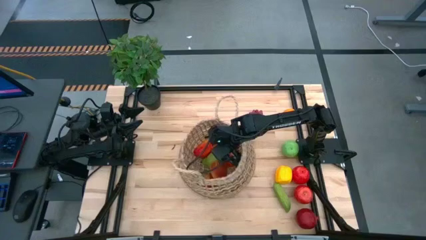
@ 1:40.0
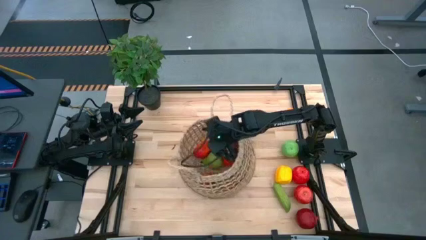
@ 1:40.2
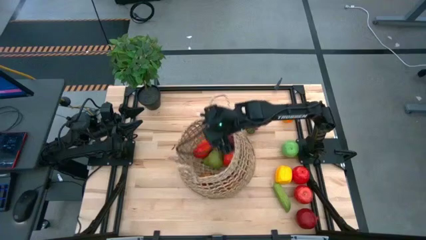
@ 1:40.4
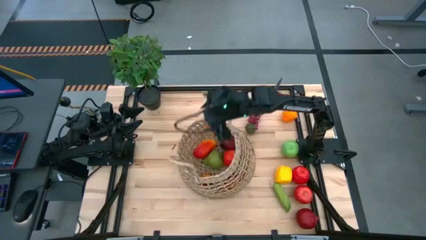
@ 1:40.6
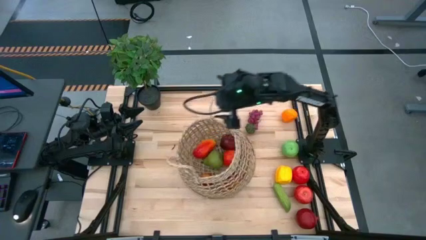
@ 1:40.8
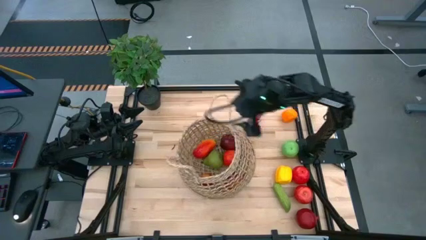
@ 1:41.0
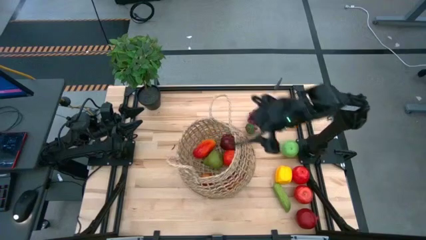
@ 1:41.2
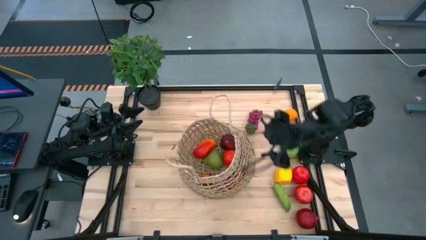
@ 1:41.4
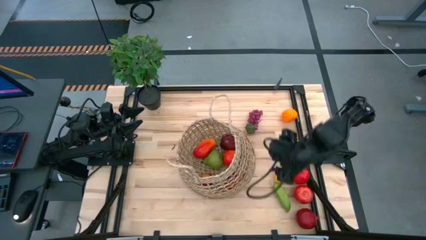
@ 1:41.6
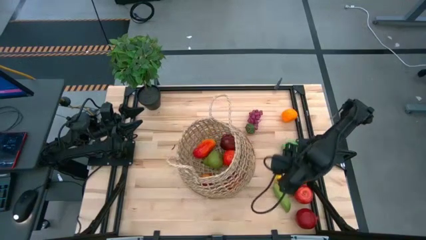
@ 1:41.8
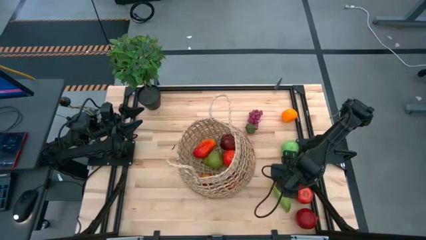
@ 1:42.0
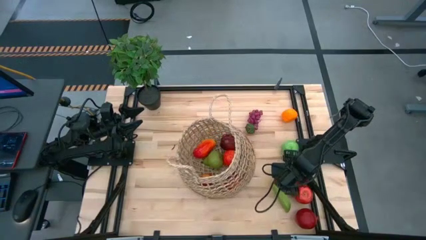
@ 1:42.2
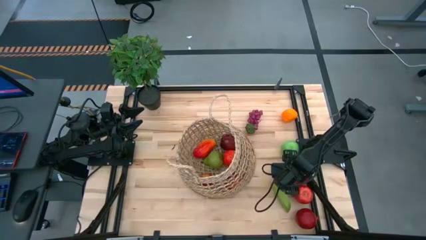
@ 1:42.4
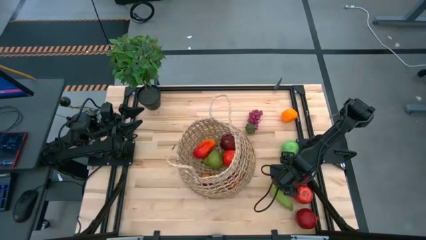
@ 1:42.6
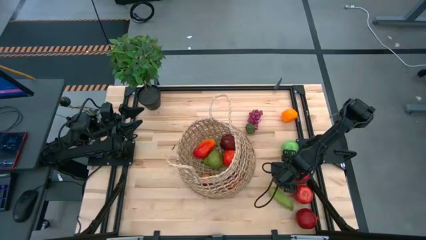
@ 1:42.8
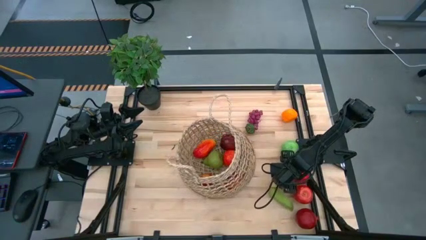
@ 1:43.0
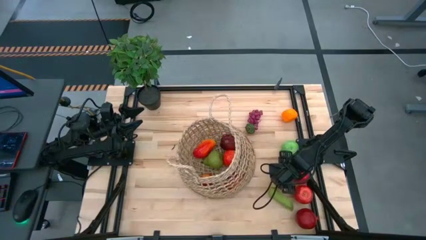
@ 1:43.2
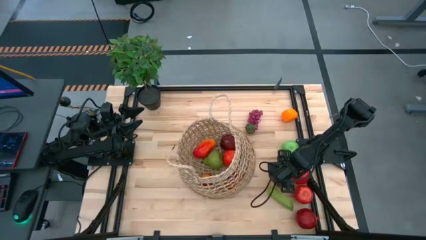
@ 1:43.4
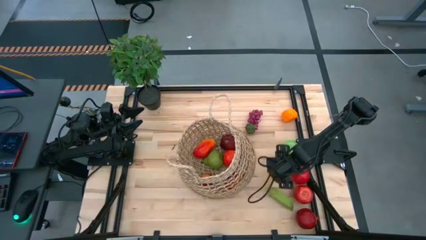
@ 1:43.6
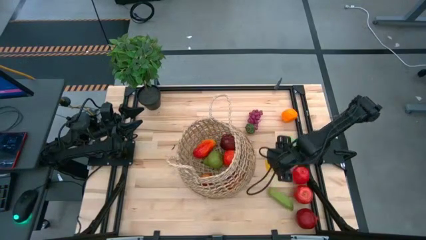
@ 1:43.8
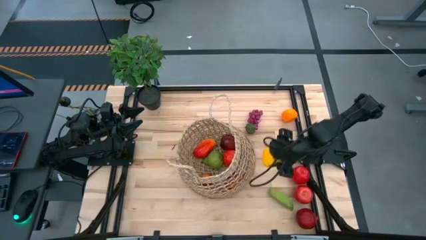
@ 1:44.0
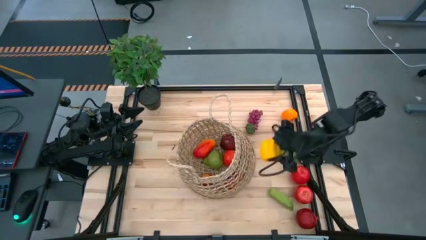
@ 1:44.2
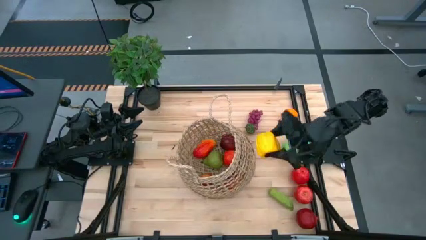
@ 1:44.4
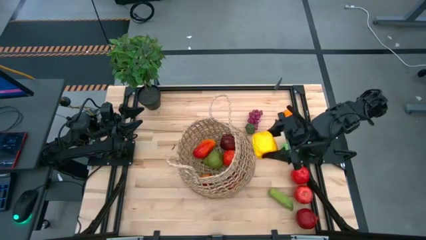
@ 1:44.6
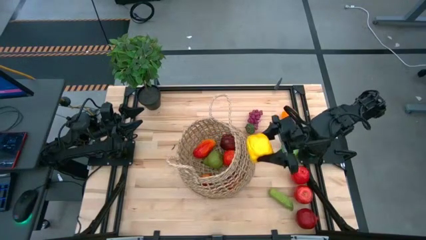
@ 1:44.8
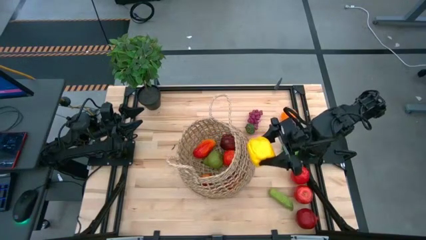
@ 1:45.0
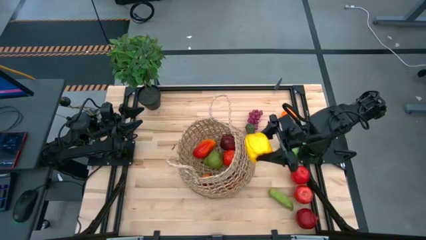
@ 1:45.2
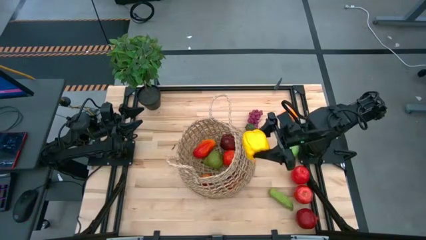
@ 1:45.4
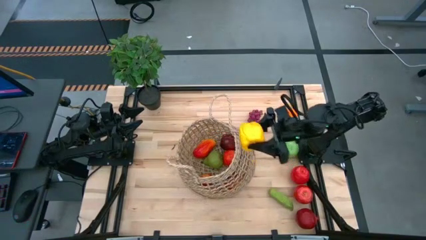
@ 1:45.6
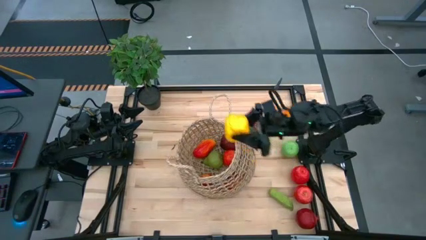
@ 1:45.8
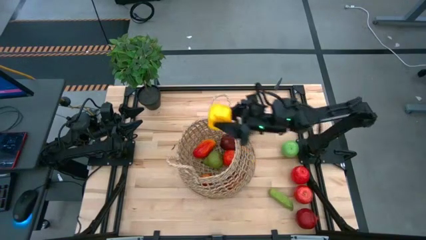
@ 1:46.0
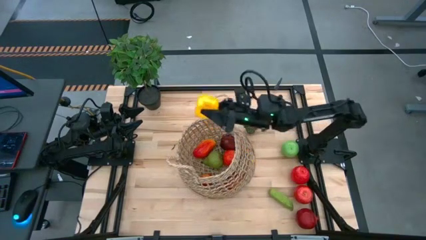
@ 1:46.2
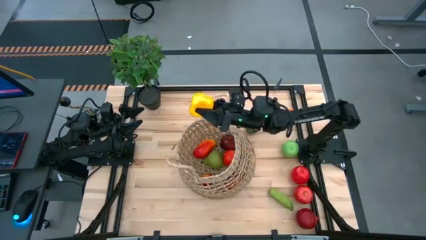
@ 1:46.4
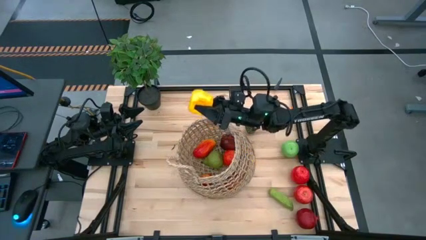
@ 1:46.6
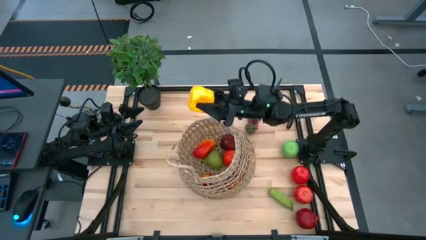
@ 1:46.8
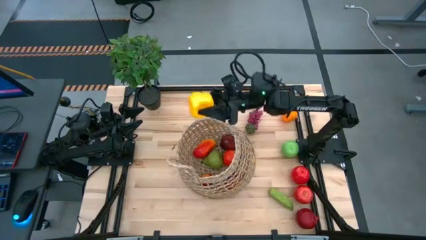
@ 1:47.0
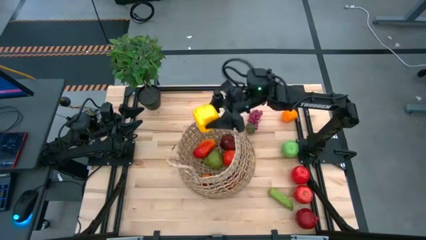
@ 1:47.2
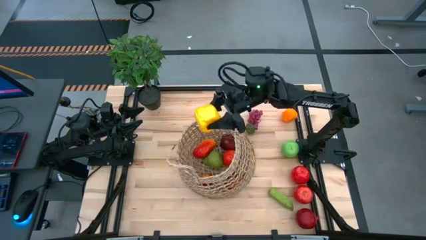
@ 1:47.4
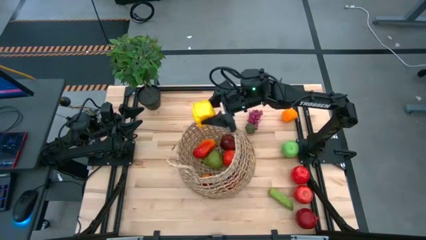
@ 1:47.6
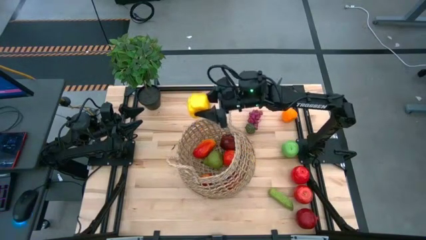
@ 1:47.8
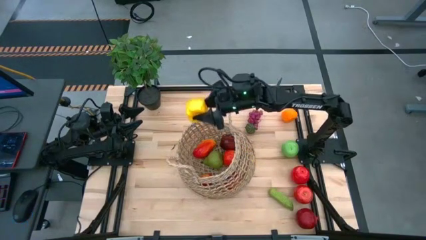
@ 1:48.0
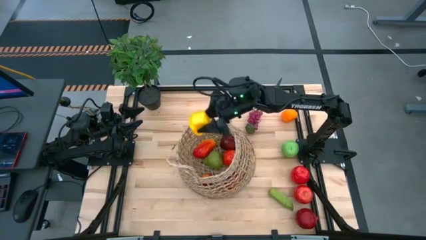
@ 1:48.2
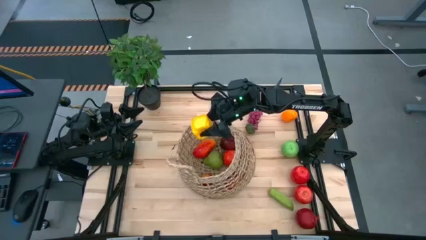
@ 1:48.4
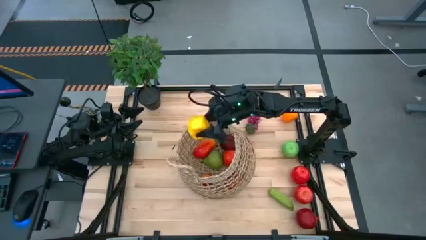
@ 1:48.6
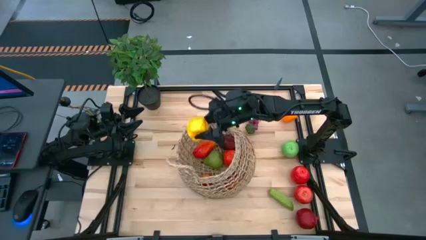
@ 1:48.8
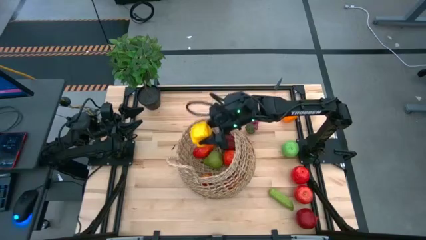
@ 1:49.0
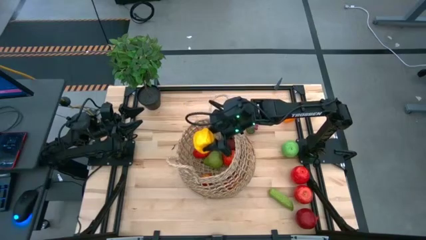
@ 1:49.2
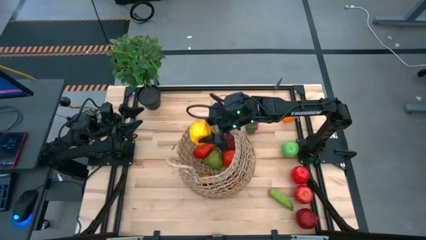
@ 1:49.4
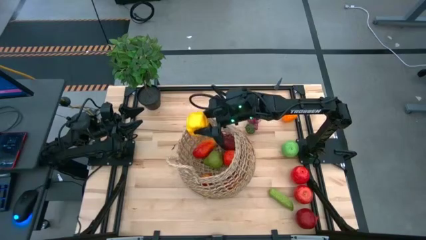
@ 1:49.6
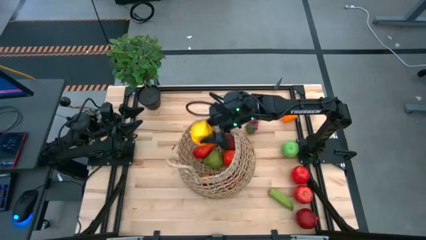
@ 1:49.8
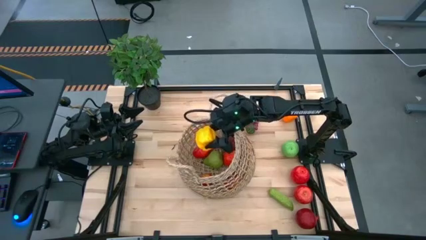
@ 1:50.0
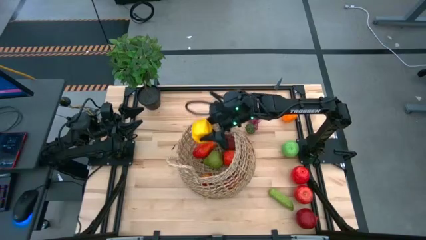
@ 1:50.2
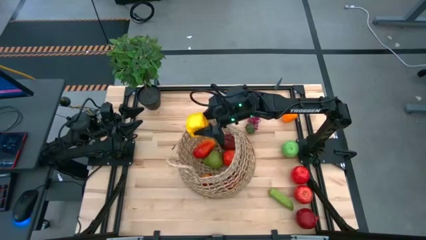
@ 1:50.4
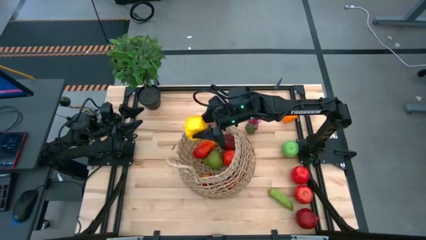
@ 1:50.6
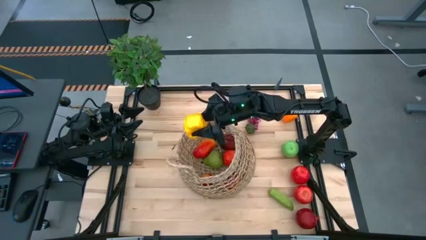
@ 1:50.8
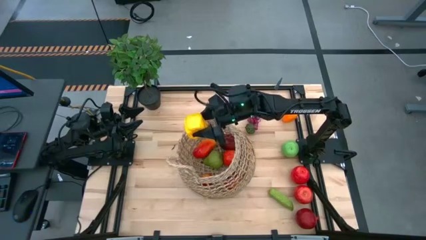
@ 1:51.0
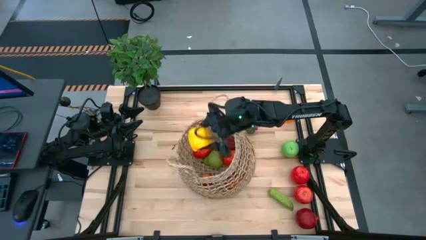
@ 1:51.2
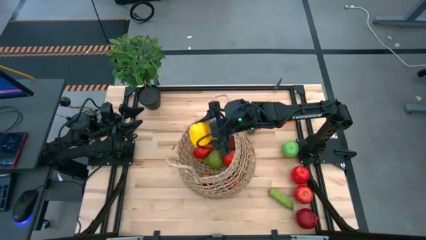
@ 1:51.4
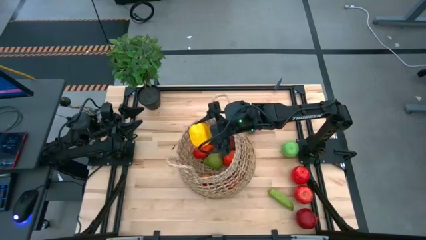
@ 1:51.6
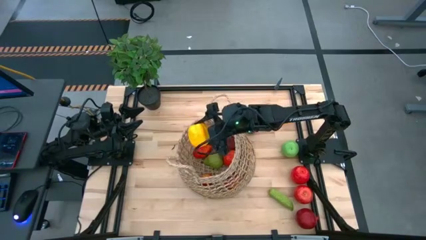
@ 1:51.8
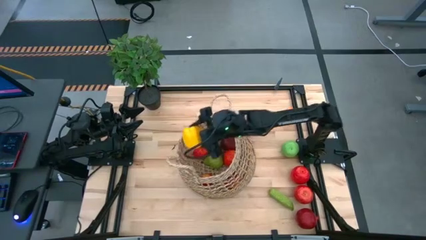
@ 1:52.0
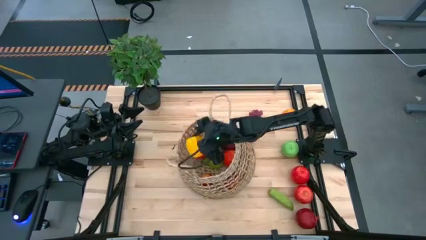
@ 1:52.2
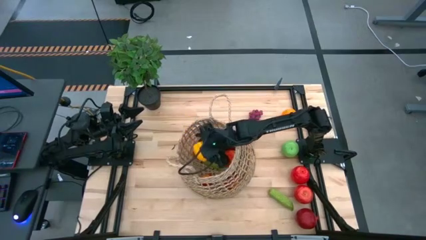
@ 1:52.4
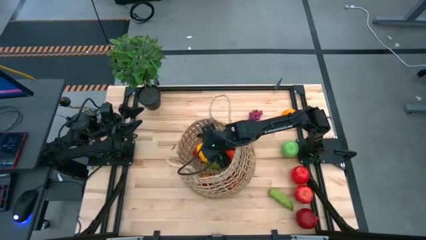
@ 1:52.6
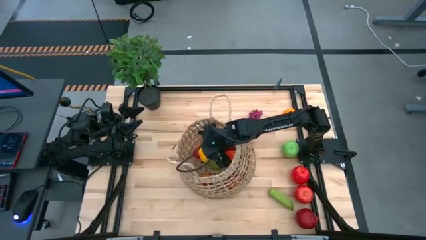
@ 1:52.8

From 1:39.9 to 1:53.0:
Task: Build produce basket
Put the yellow bell pepper into the brown basket

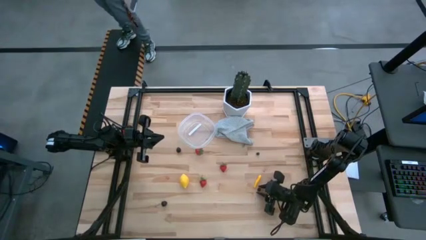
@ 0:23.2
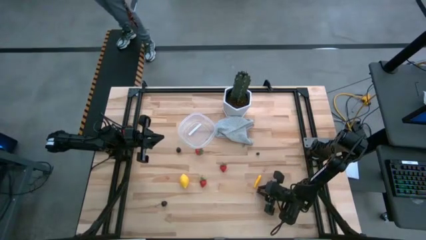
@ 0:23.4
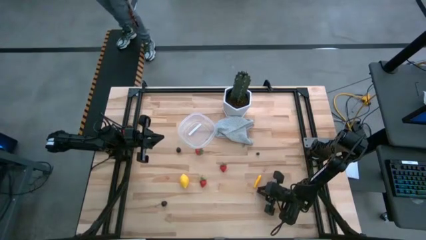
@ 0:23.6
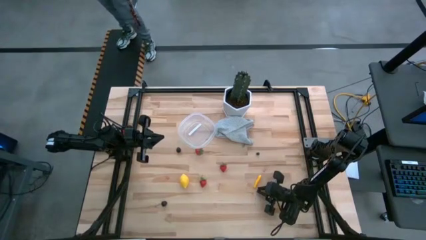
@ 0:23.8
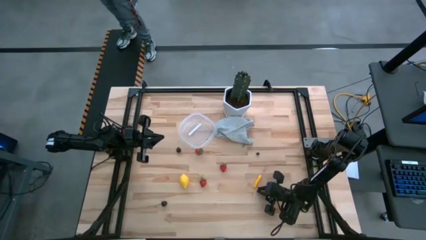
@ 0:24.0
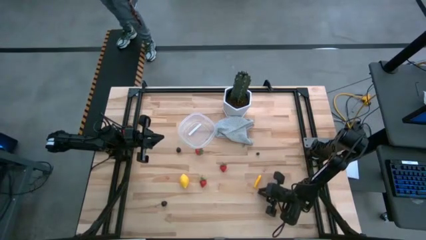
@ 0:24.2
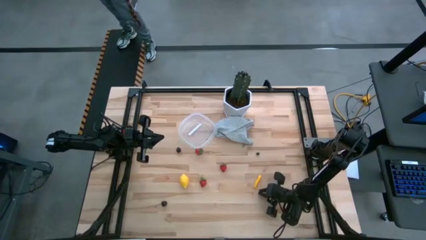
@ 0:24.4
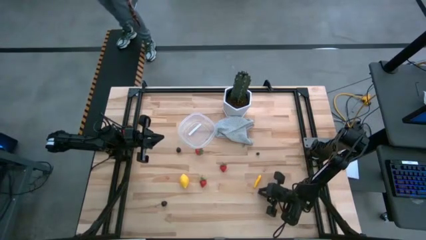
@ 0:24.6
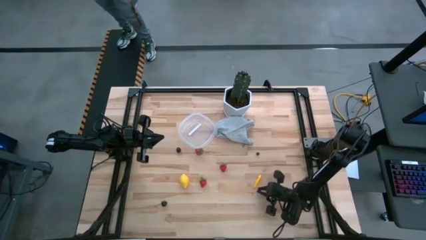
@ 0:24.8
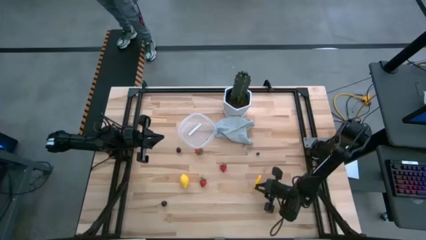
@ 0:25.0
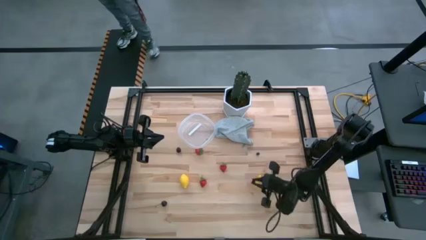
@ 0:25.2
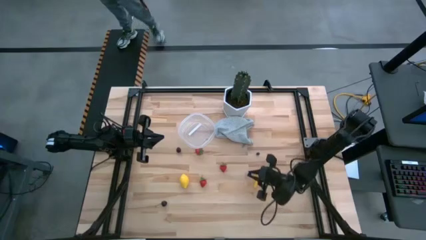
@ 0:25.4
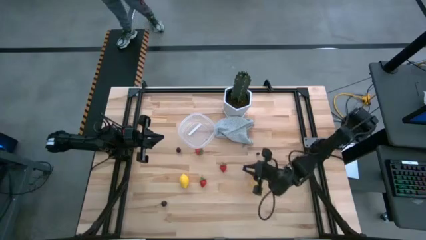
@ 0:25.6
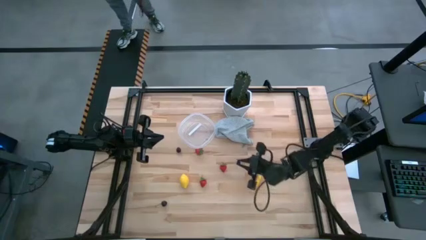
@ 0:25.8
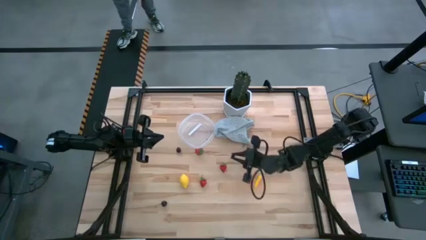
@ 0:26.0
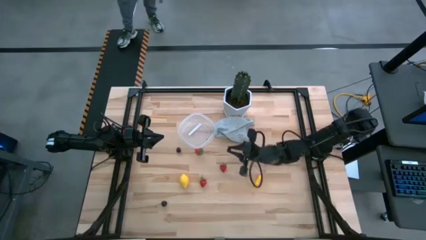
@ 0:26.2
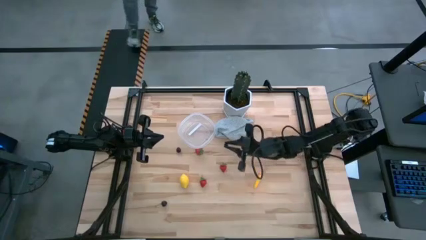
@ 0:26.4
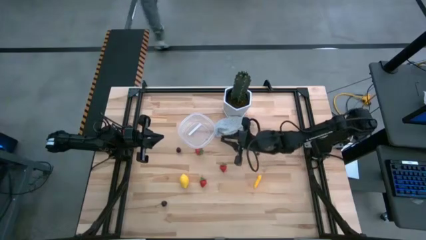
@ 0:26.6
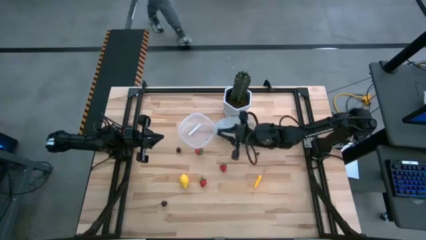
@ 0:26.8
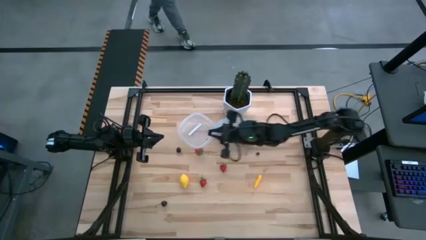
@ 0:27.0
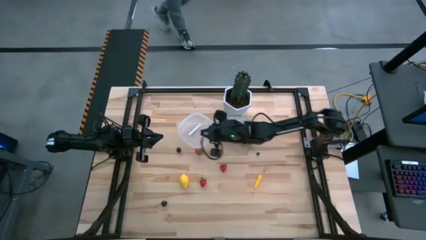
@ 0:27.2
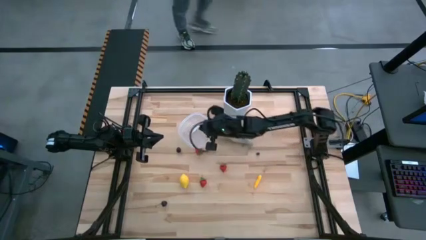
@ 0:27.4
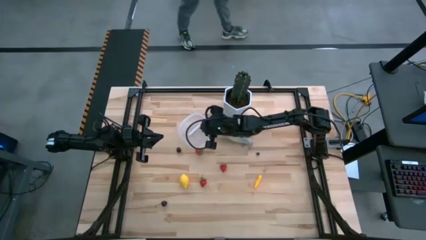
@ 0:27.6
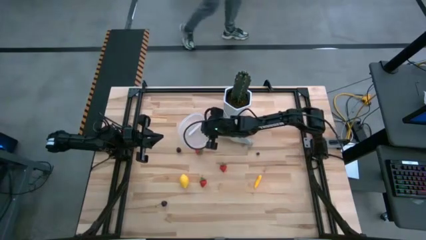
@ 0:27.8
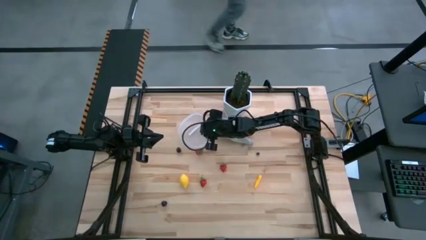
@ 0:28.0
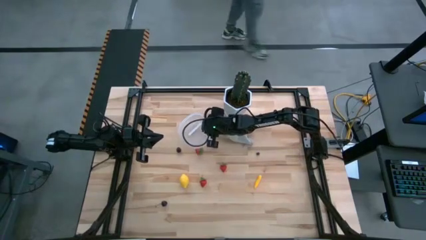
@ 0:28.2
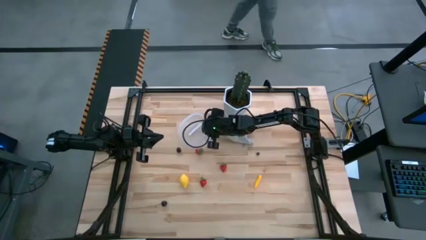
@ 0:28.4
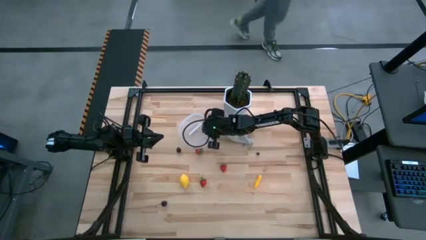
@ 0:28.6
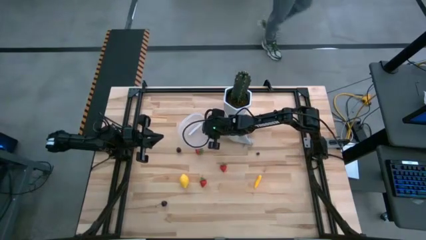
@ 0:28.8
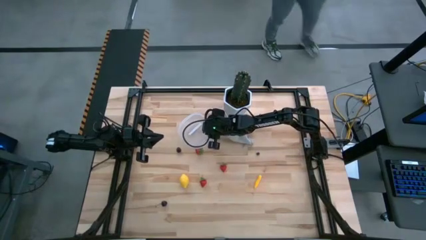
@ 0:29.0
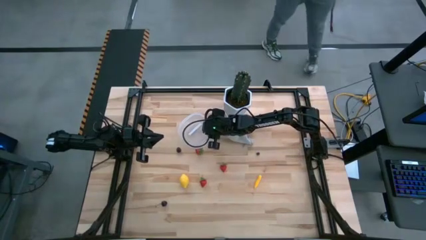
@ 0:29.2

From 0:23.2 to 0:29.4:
Task: Pick and placing Produce into tupperware
Put the bottom blueberry into the transparent bin
